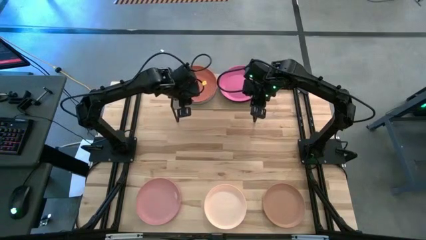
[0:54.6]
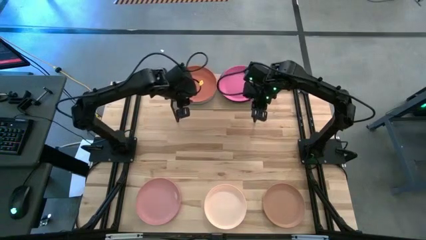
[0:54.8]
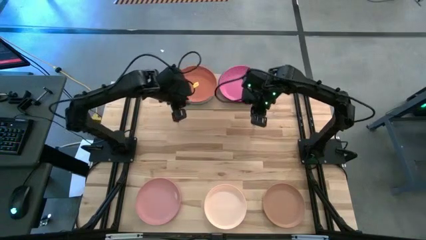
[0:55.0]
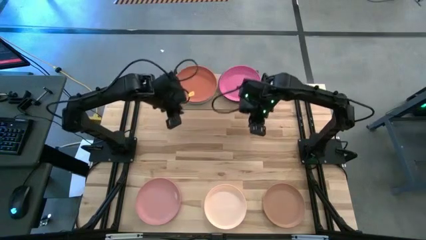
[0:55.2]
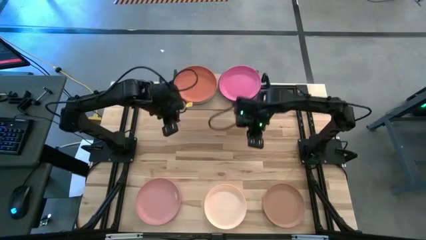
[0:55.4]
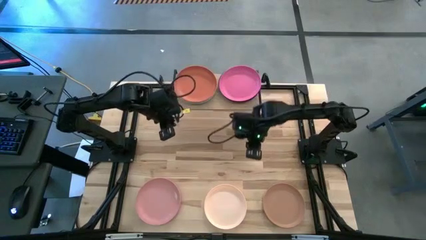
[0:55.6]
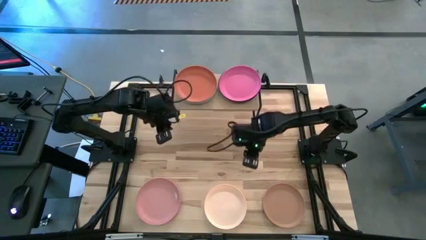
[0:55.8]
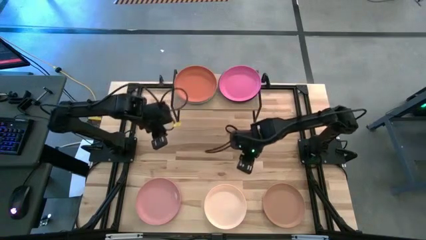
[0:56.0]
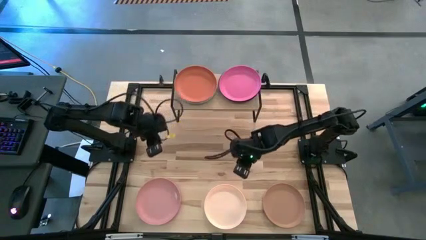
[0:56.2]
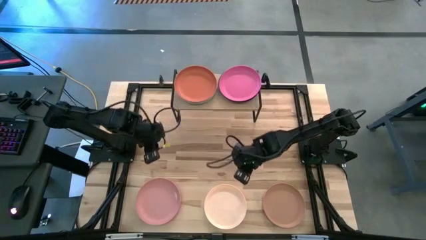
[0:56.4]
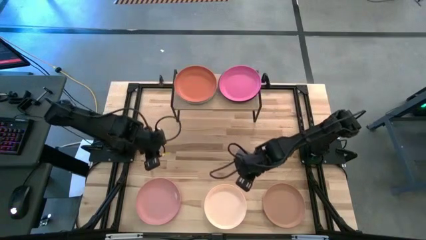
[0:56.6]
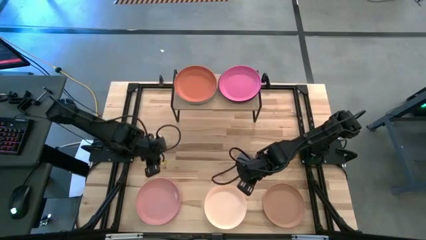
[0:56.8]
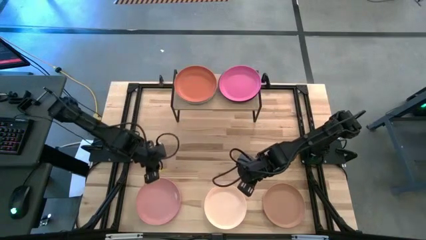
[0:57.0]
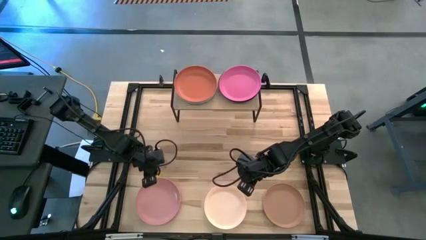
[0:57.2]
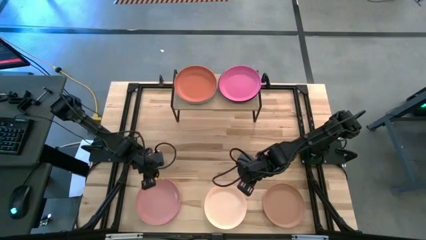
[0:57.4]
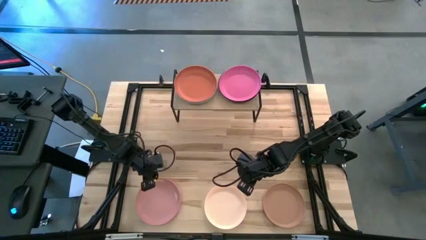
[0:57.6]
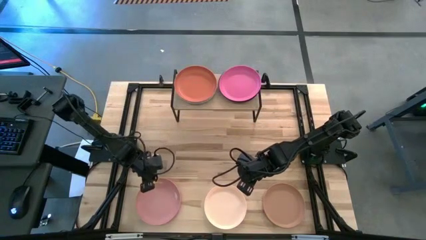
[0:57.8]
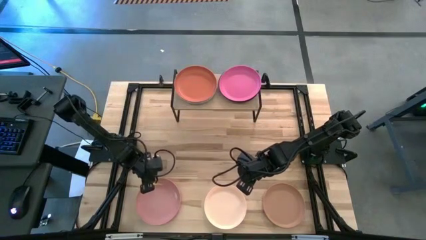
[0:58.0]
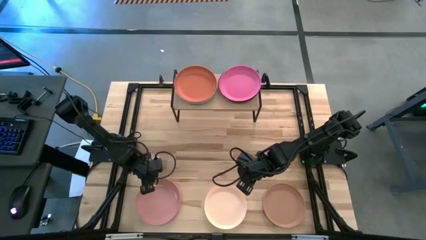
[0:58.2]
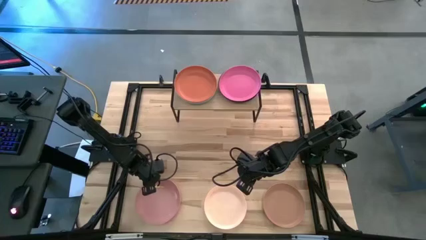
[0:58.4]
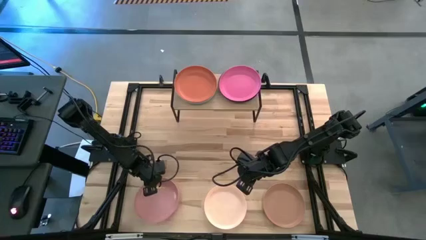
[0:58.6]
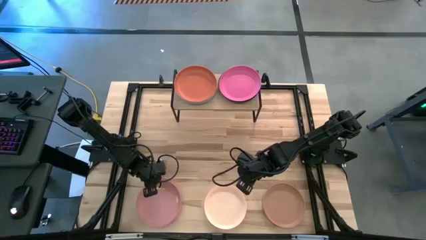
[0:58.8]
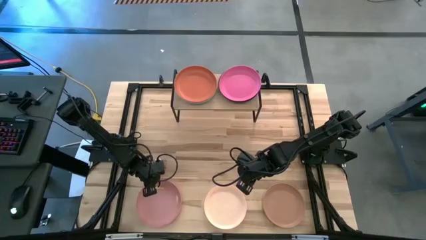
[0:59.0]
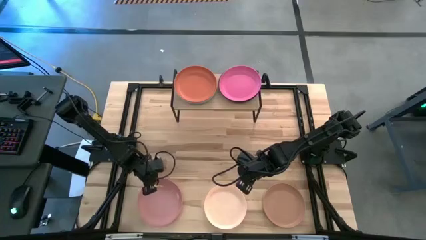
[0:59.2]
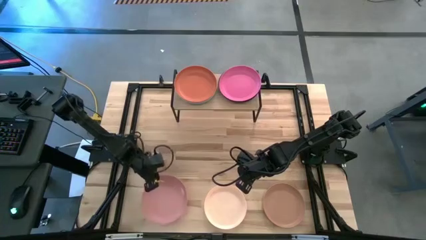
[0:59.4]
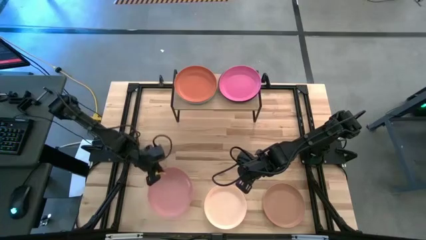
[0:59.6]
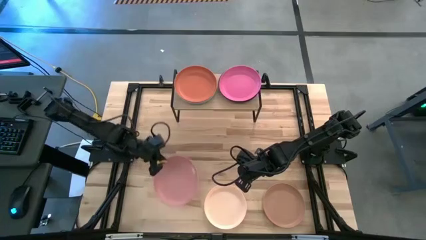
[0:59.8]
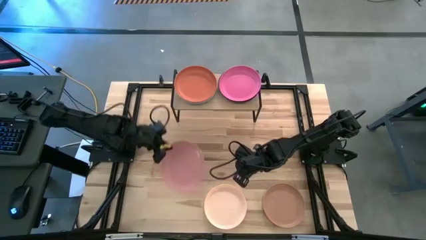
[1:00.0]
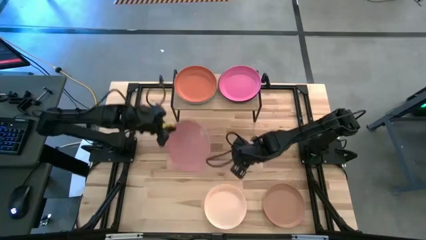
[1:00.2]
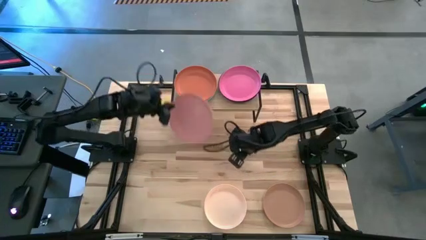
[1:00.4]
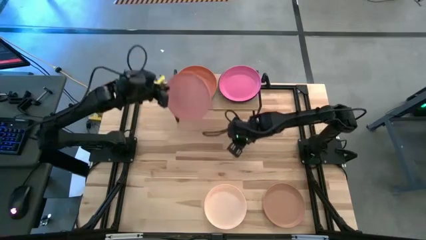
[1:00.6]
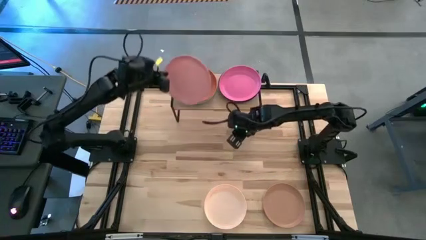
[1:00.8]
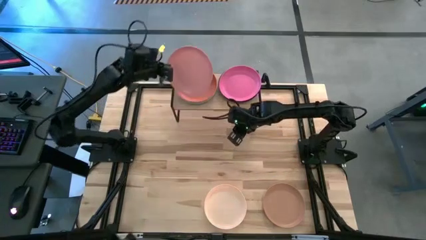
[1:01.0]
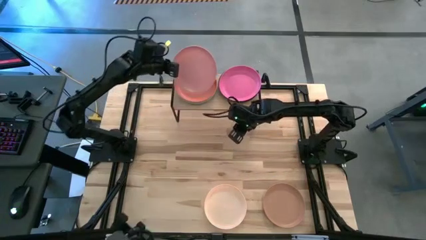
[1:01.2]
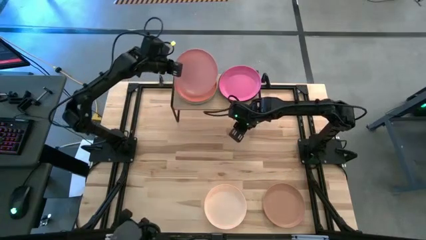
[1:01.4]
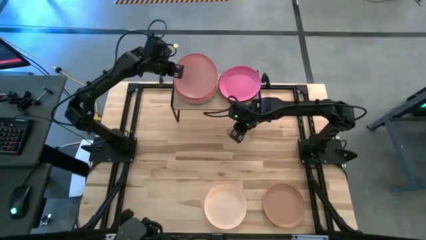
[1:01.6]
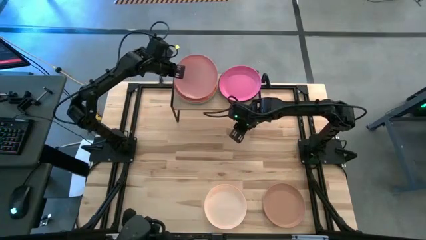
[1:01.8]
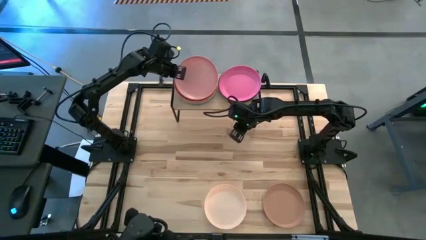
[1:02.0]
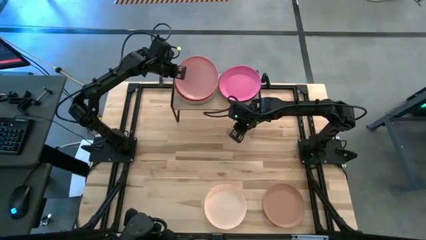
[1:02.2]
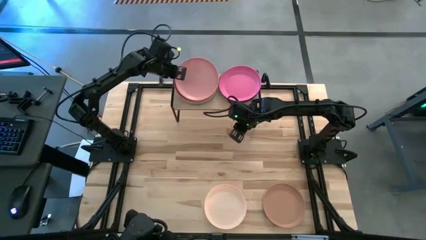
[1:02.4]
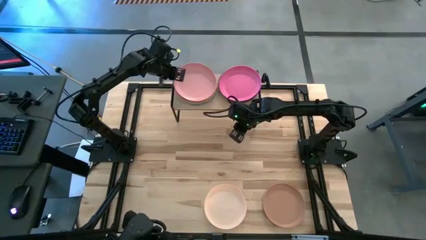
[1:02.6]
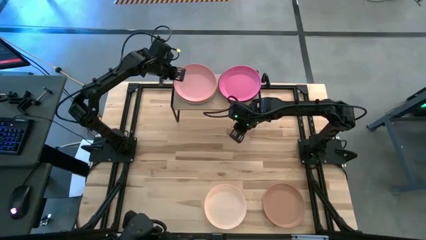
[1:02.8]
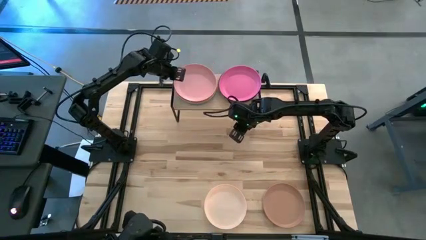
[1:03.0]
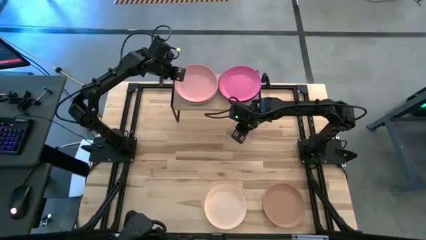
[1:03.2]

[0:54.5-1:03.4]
Task: Place and stack plates onto a shelf
Stack the light pink plate on top of the orange plate on the shelf

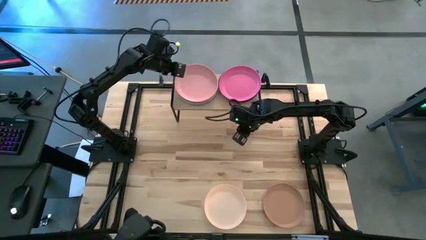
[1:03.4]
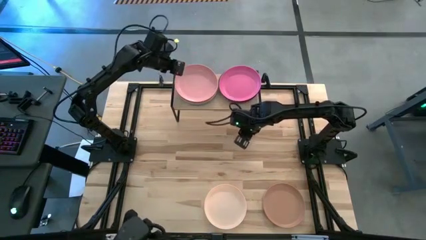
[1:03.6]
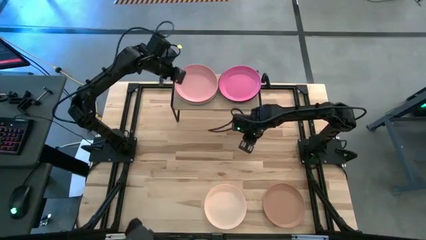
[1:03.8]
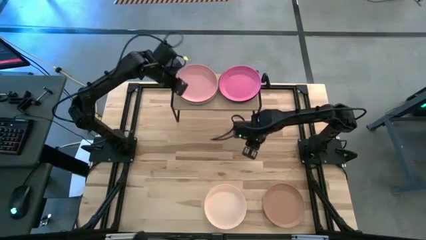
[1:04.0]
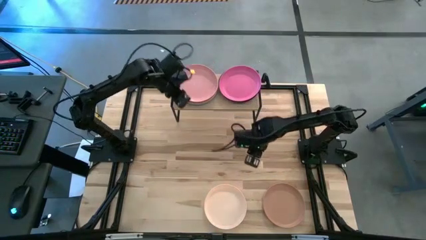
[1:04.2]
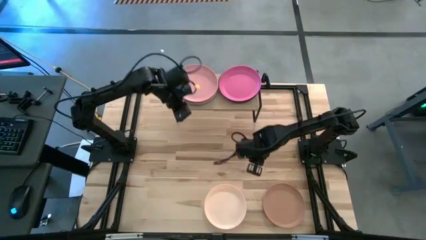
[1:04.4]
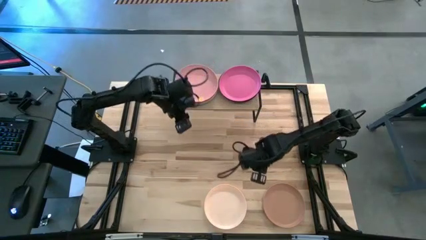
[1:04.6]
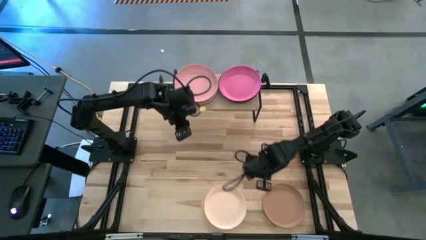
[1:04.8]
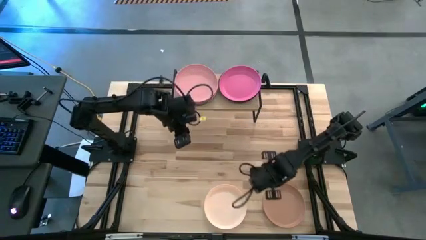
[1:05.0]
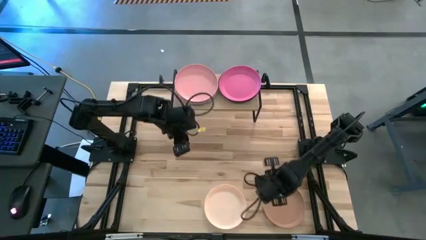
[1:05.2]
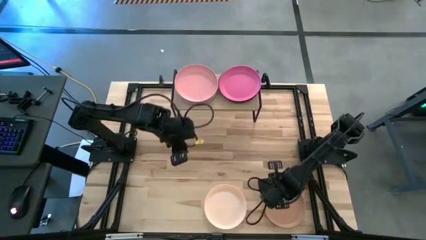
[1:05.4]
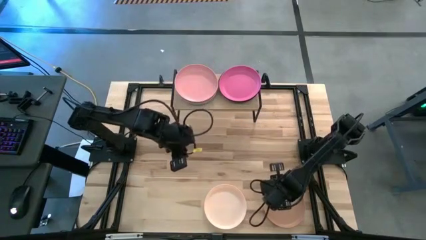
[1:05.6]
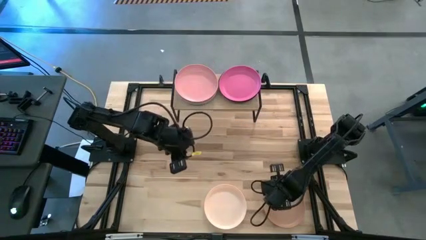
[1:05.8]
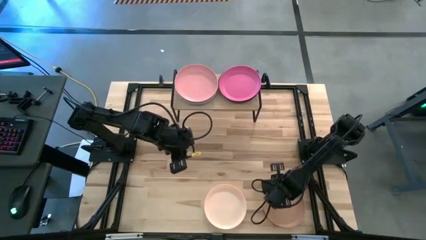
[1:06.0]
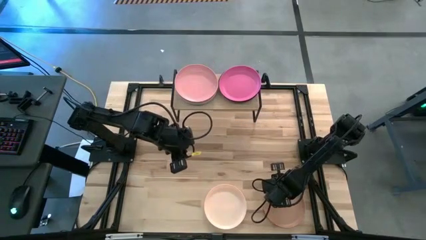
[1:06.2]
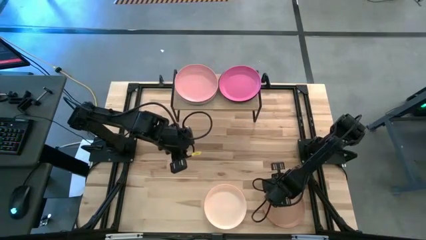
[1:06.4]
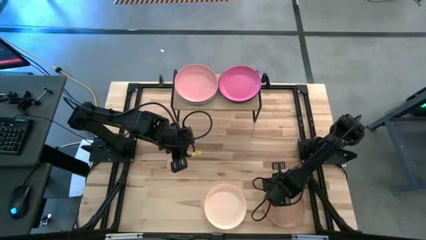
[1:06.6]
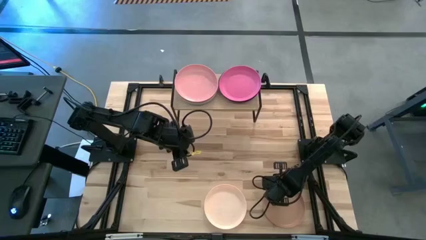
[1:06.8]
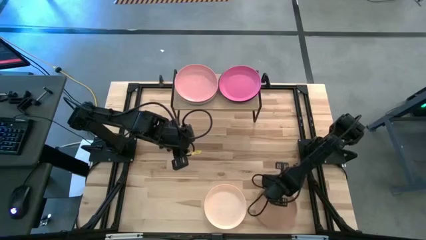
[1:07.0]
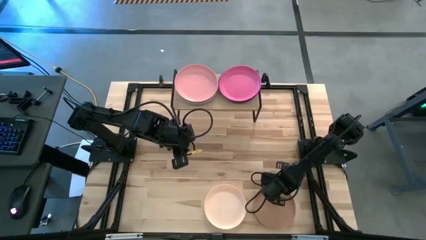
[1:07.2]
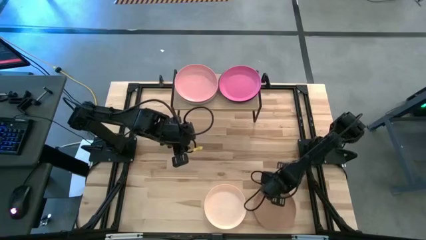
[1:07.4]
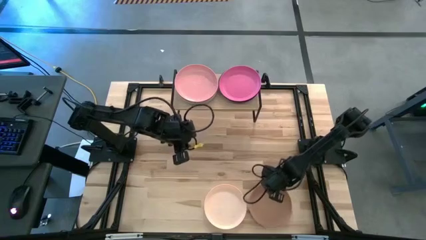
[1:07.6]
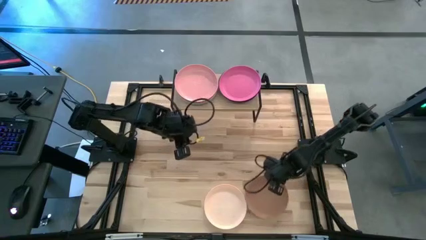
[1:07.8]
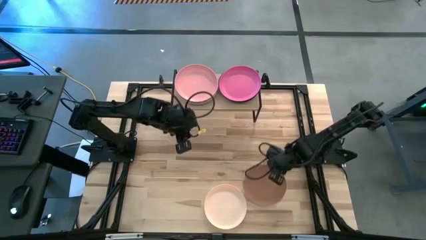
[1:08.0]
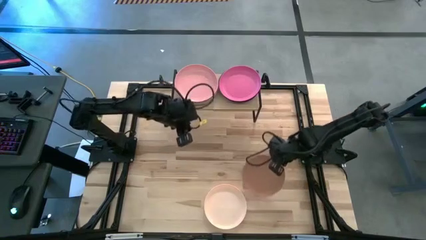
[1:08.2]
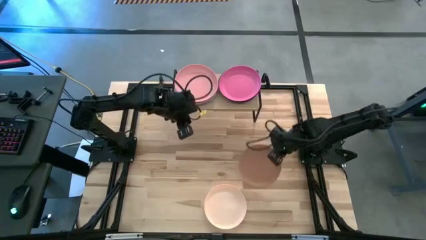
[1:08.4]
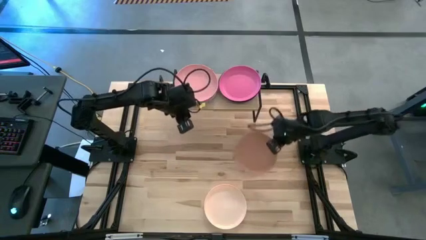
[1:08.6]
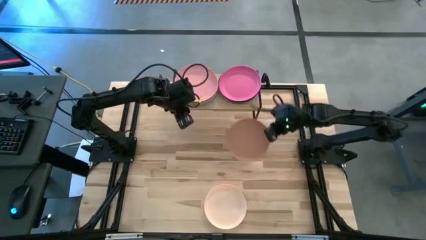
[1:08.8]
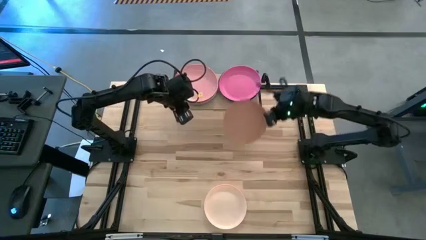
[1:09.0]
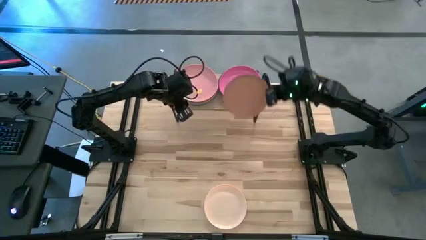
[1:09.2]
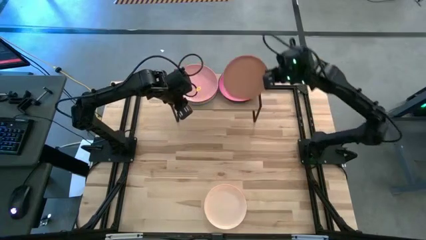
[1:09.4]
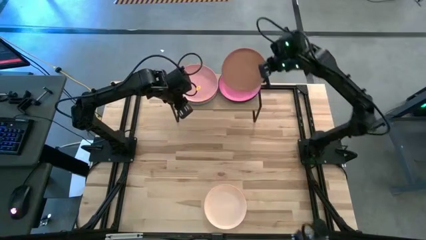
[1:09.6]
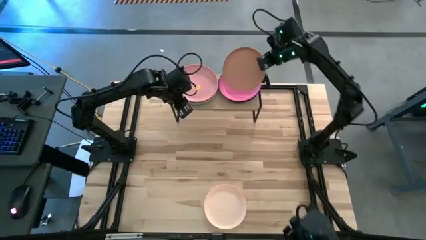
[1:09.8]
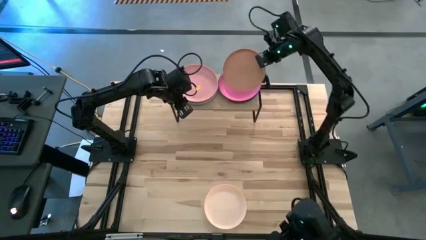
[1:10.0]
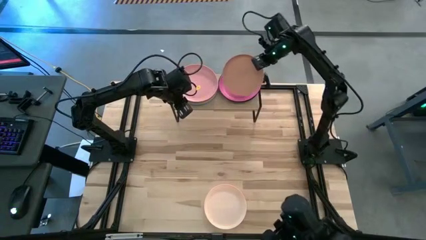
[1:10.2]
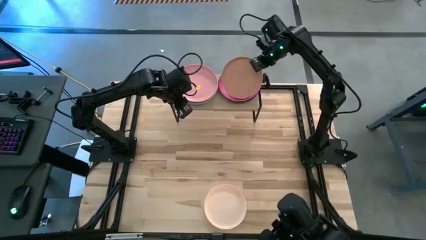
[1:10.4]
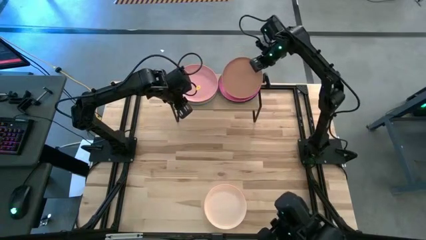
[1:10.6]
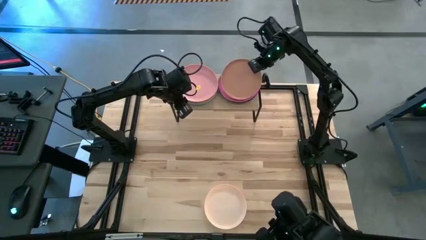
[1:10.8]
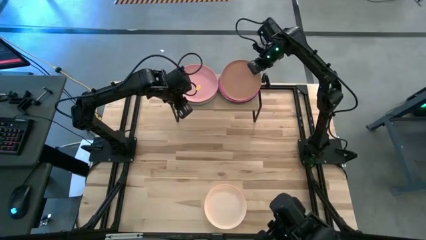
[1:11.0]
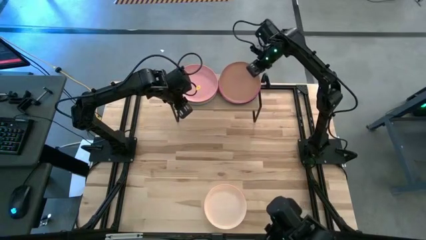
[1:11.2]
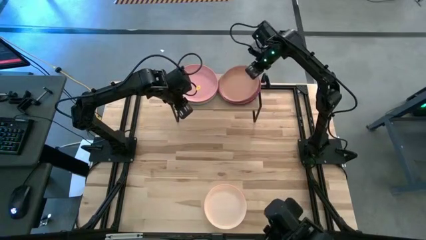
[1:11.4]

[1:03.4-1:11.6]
Stack the brown plate on top of the pink plate on the shelf
